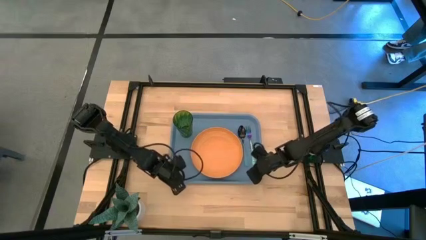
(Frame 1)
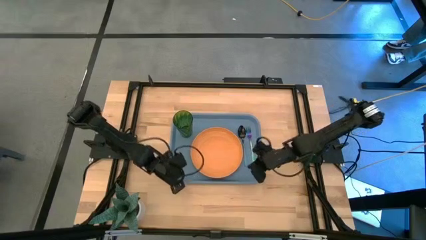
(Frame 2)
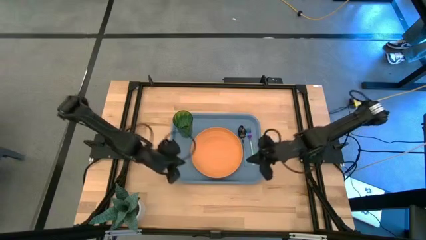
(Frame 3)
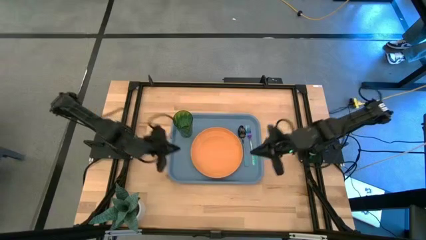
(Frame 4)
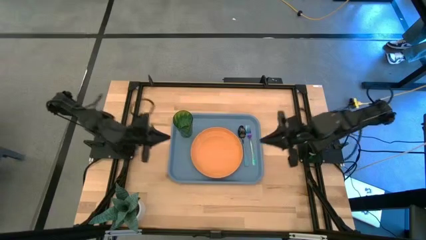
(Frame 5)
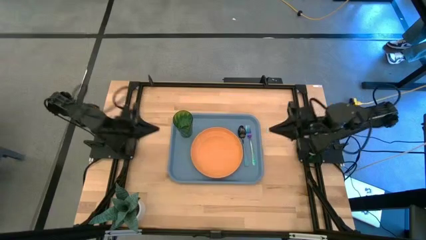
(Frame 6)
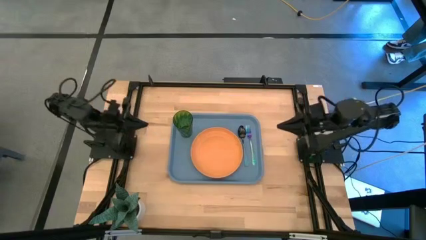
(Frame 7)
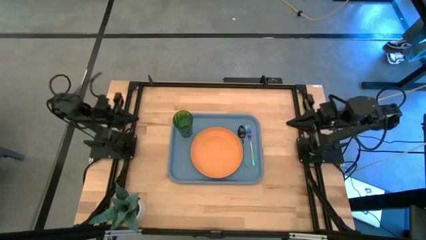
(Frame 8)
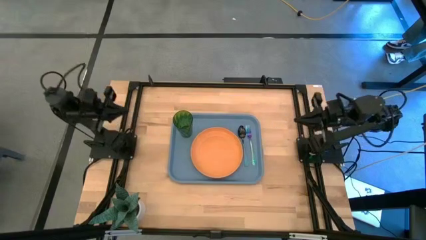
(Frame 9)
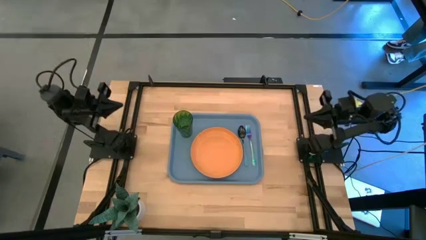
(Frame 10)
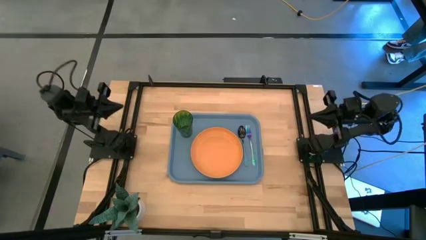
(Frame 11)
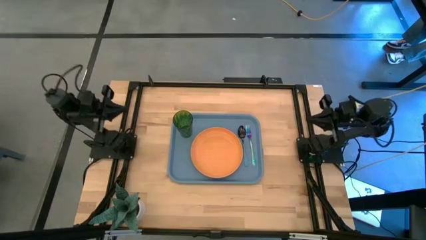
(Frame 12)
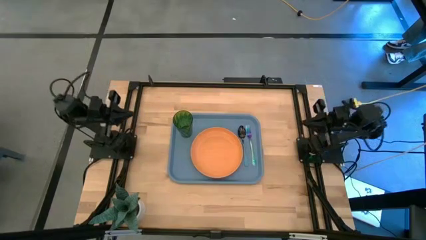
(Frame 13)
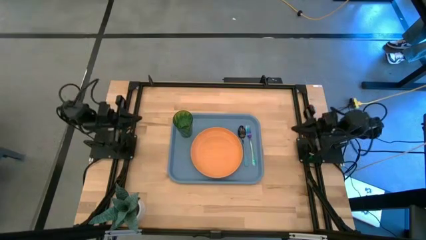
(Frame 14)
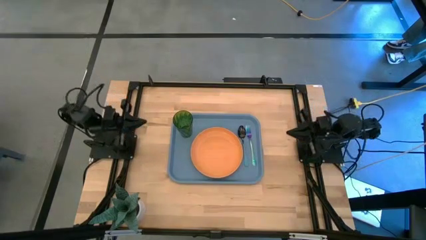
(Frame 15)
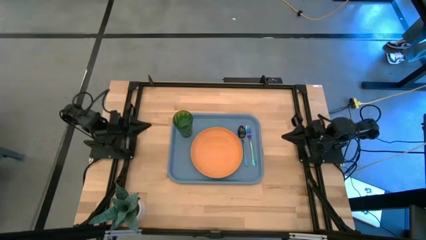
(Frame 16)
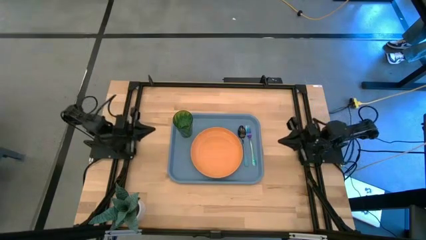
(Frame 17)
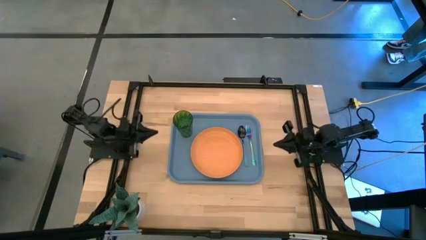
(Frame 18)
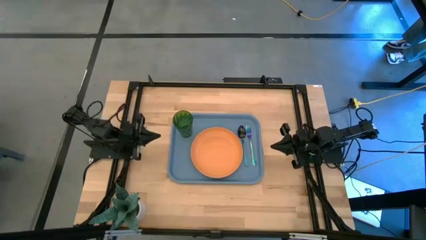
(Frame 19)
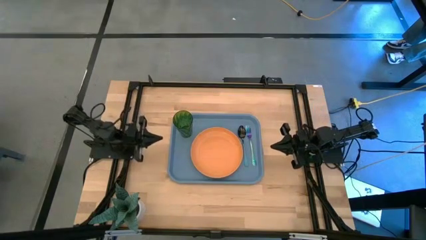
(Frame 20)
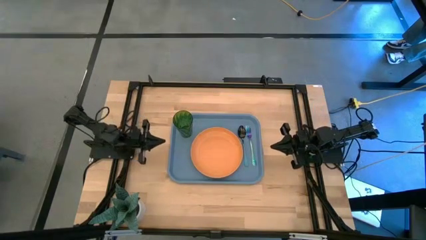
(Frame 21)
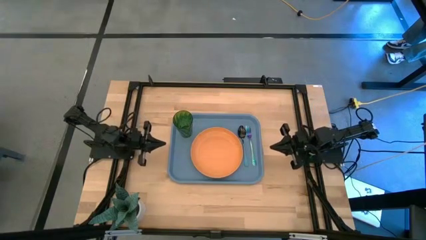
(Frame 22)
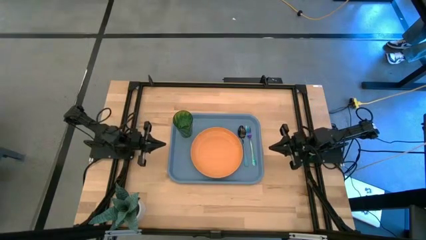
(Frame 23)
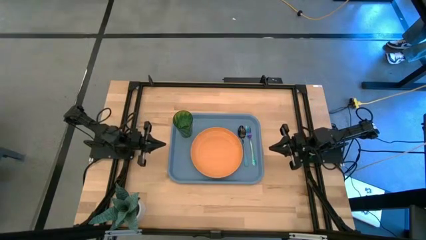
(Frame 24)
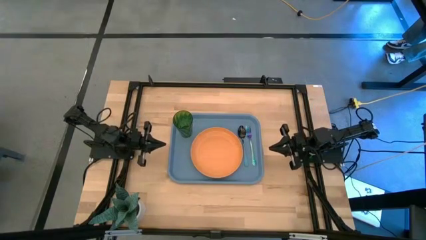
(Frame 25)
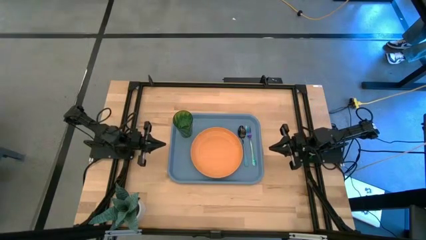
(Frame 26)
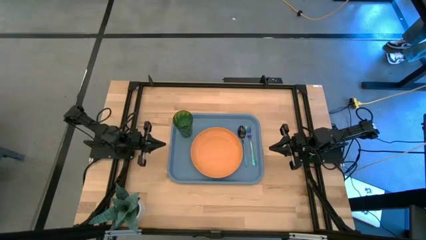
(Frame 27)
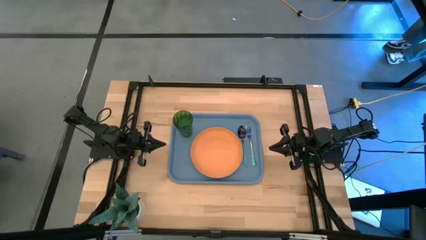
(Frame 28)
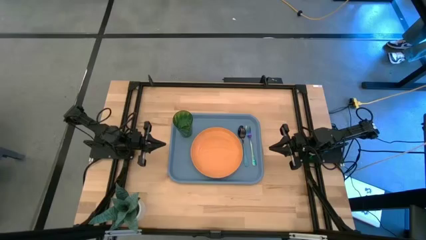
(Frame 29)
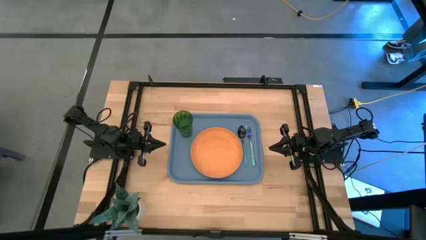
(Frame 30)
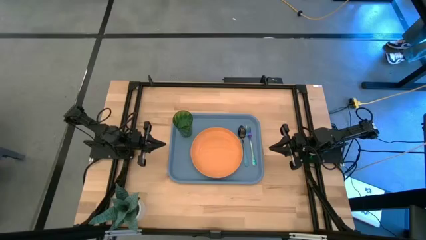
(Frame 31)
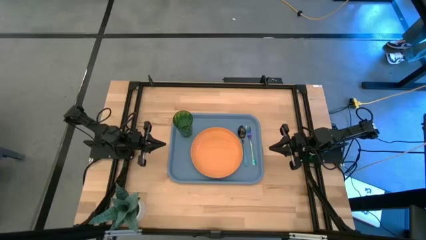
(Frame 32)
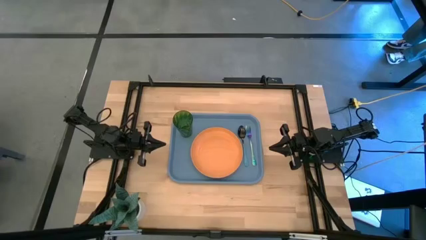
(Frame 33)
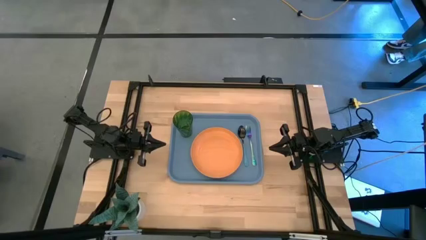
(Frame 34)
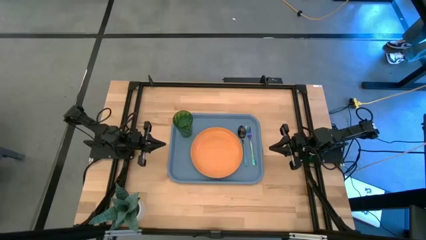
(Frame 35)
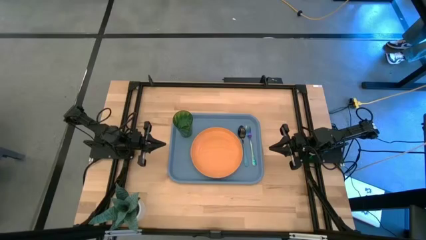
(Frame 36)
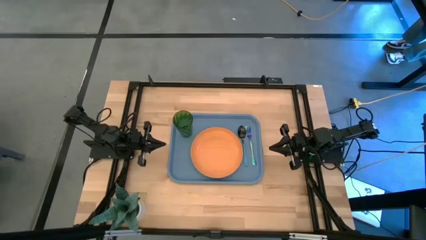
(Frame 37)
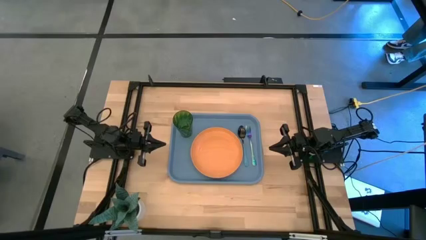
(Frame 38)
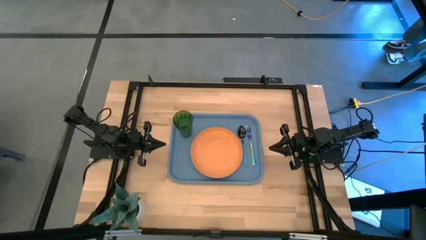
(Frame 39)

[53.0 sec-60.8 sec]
Task: Pick and place plate/cup/fork/spoon on tray
Return to Home Position

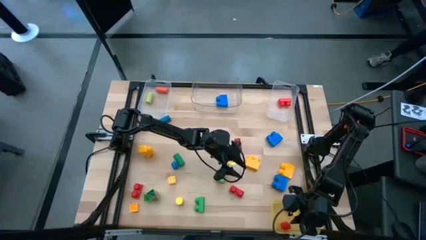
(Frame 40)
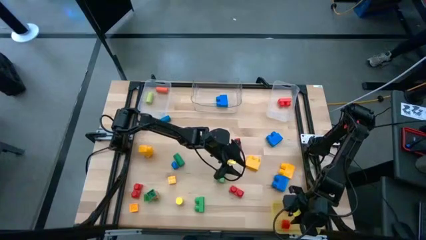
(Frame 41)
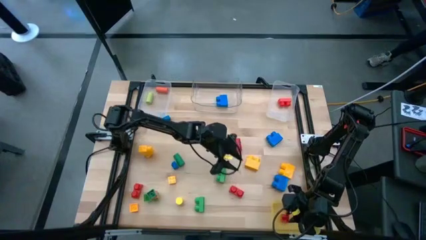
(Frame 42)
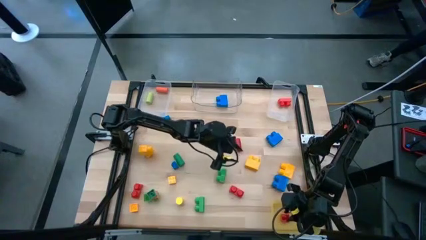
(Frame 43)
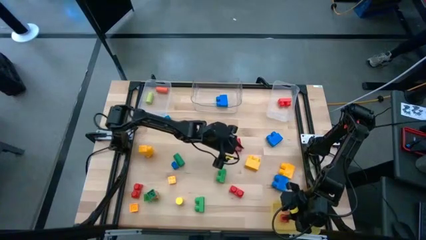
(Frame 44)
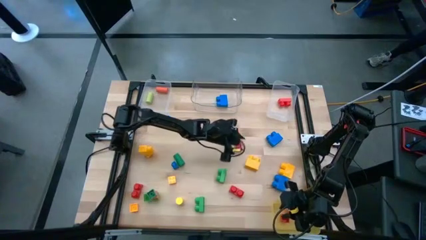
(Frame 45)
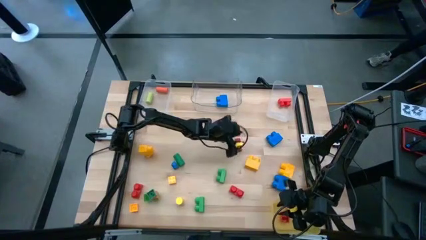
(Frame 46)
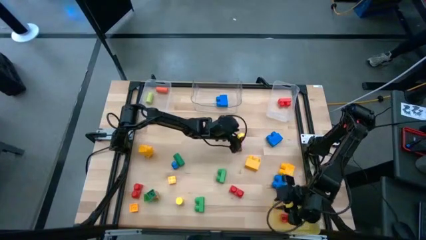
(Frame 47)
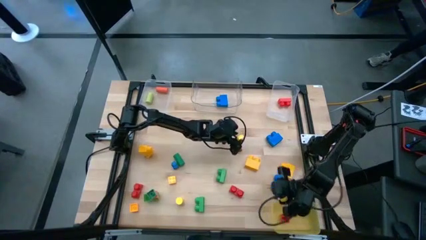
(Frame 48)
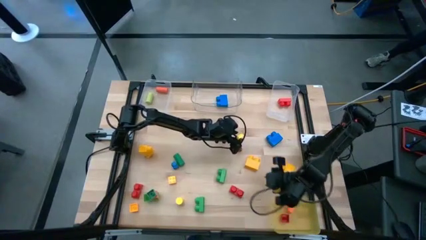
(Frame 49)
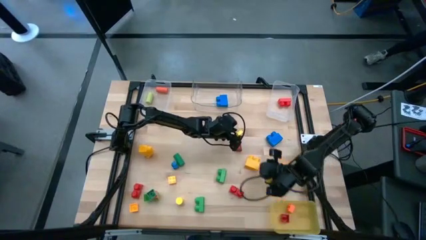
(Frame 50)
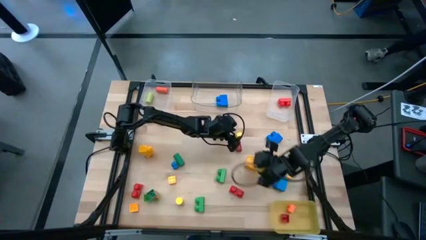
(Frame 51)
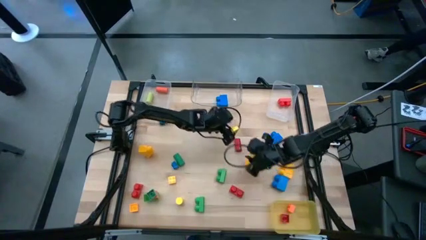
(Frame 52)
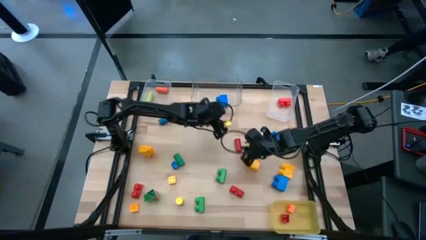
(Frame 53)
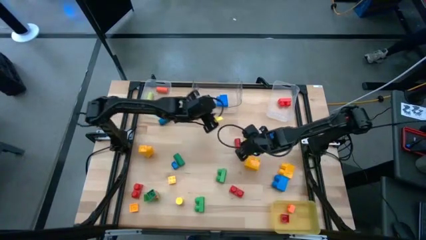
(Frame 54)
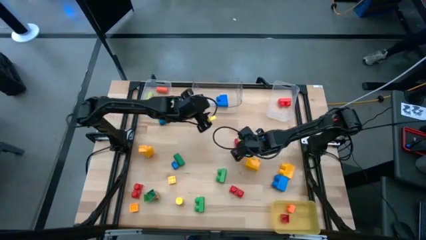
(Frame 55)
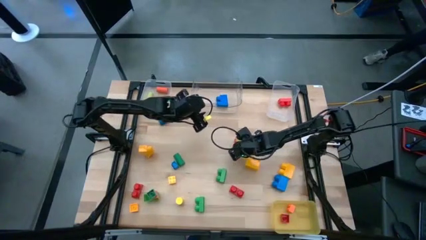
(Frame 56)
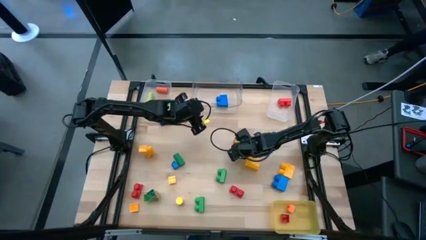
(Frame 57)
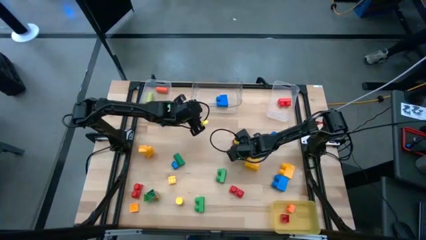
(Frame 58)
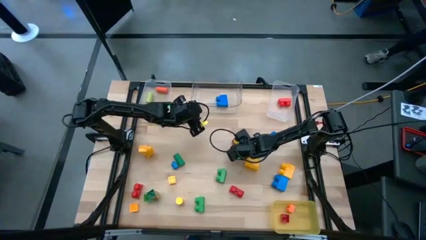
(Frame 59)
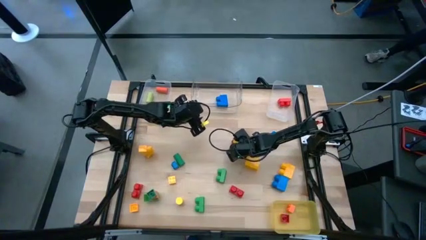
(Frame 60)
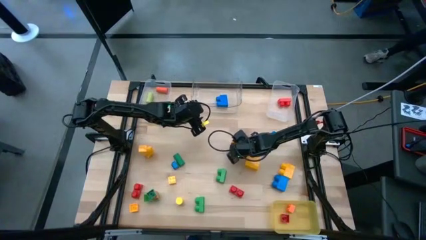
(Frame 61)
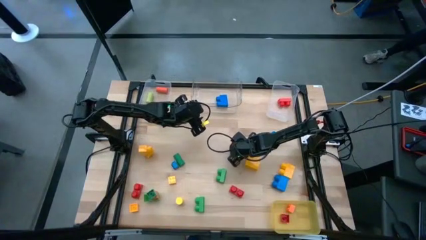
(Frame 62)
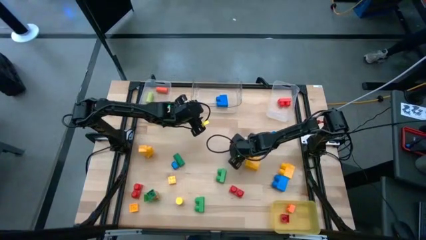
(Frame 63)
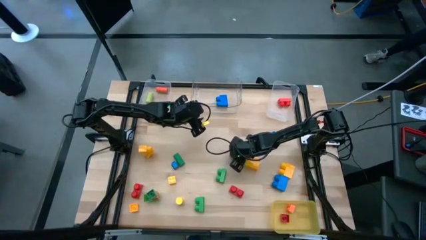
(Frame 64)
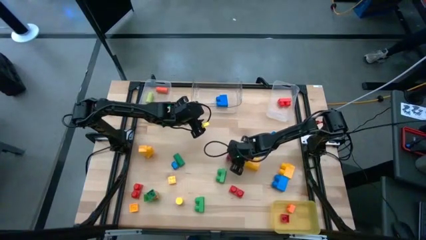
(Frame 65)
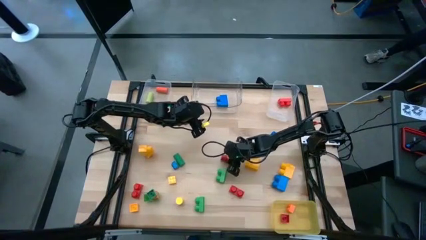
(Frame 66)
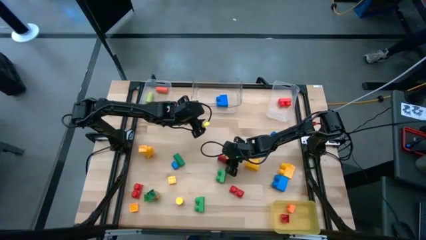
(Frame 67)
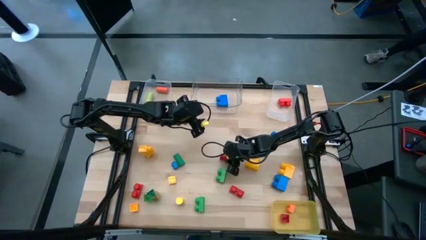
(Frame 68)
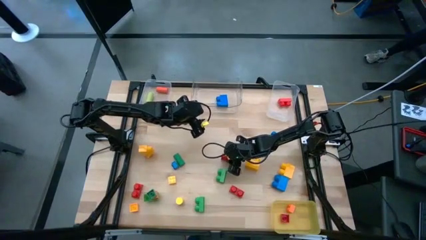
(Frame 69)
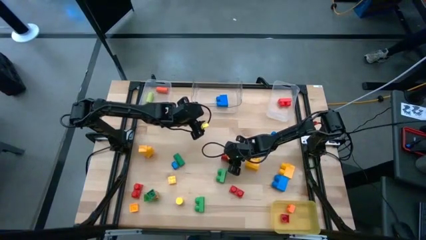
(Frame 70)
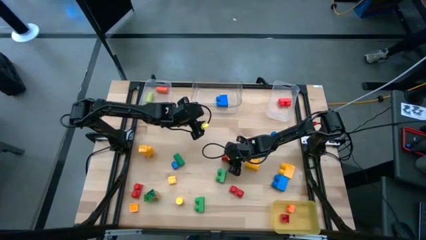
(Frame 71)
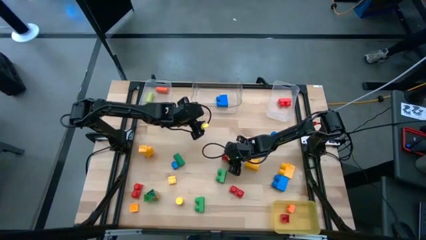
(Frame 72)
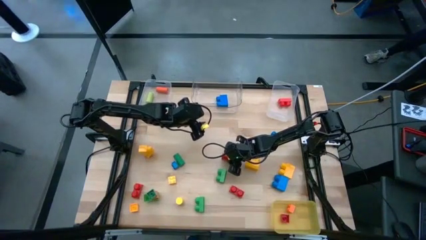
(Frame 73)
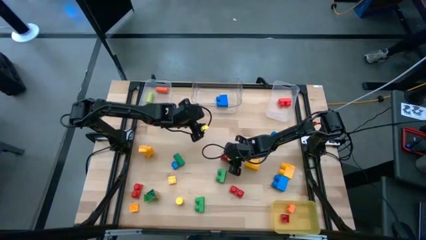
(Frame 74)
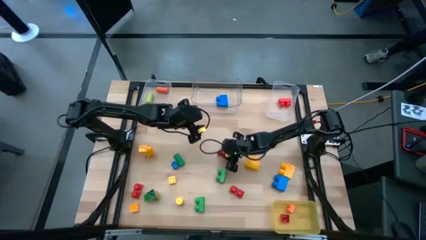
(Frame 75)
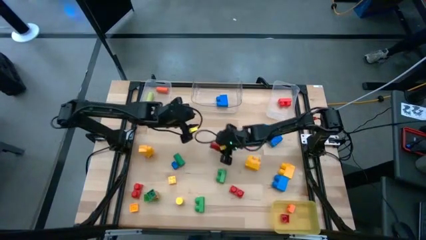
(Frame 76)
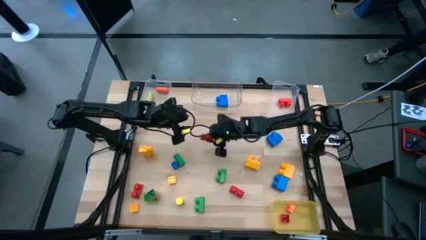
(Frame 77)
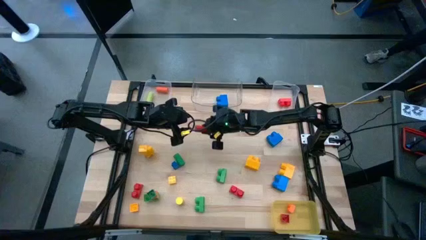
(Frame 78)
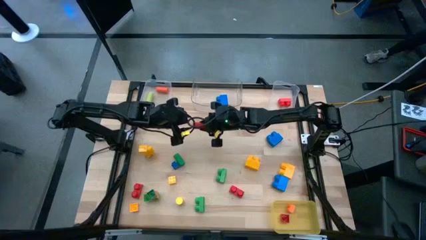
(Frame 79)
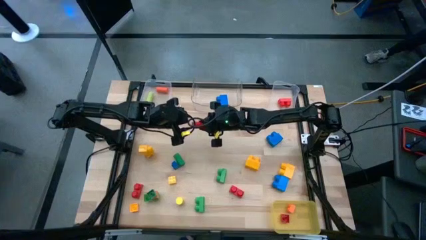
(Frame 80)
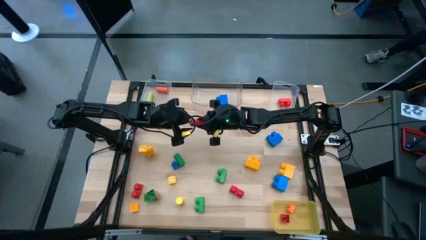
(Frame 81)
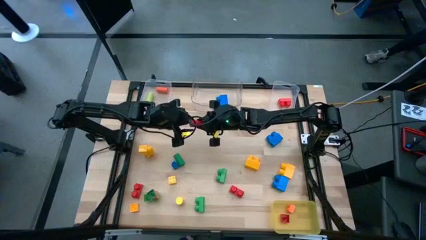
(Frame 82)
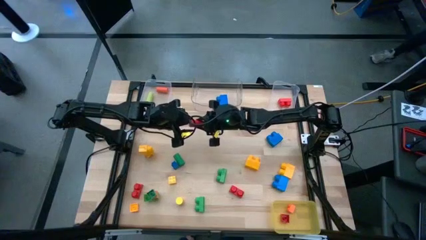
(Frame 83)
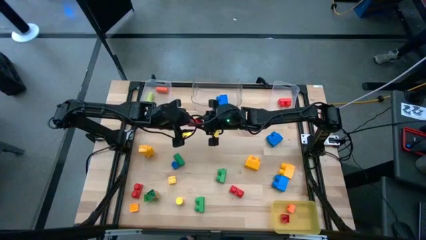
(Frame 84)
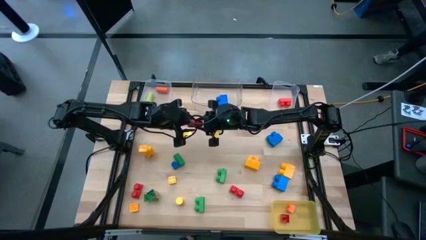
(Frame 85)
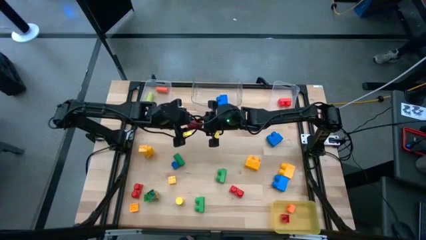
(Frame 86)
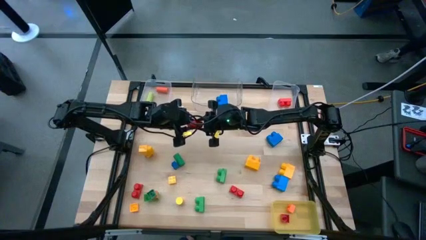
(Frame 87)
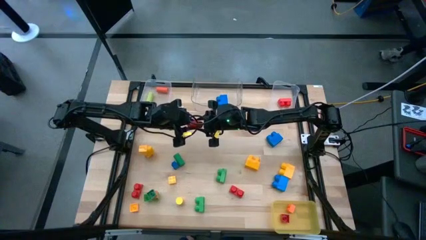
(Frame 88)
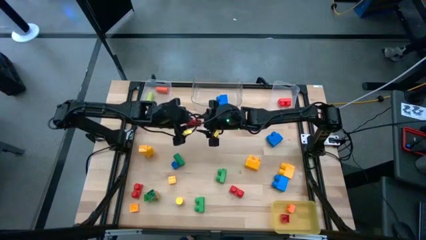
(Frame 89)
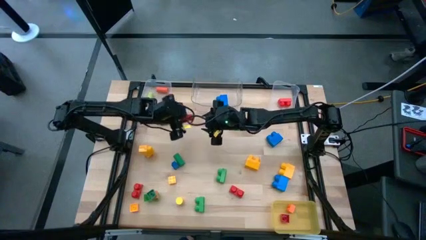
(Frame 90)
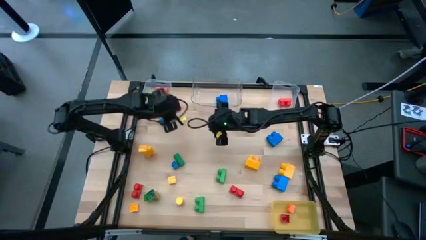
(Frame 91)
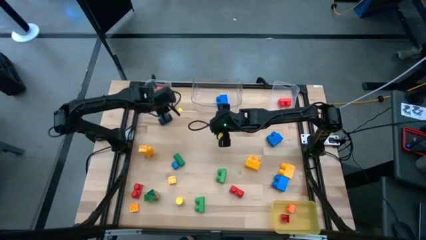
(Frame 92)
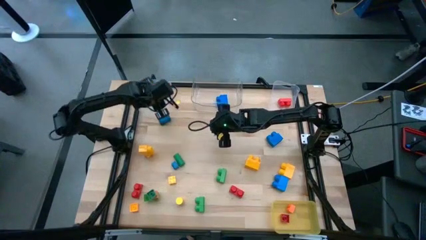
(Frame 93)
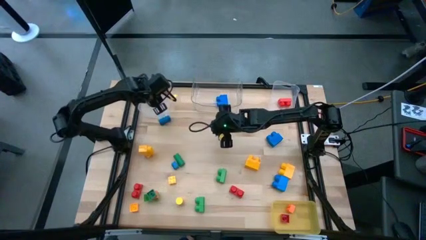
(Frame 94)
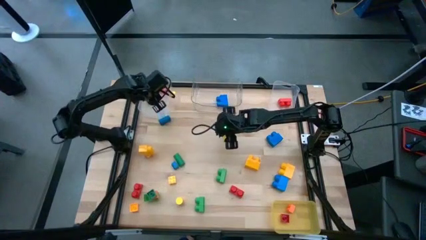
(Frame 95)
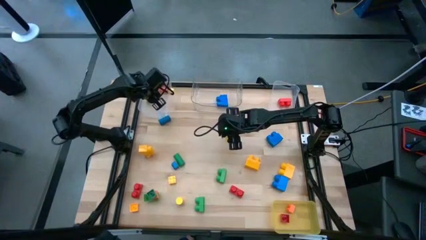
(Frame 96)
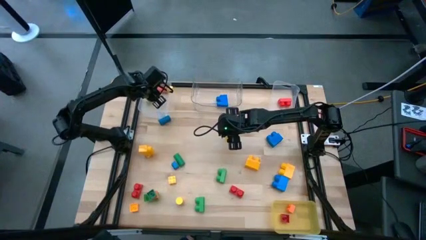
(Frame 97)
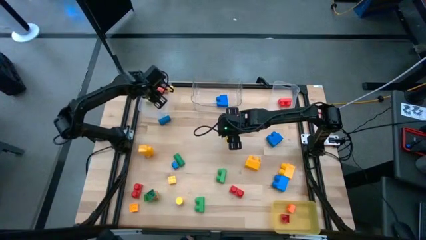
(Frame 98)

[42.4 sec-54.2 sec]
Task: Sort blocks by size
Put the red cylindrical wooden block into the left transparent bin
